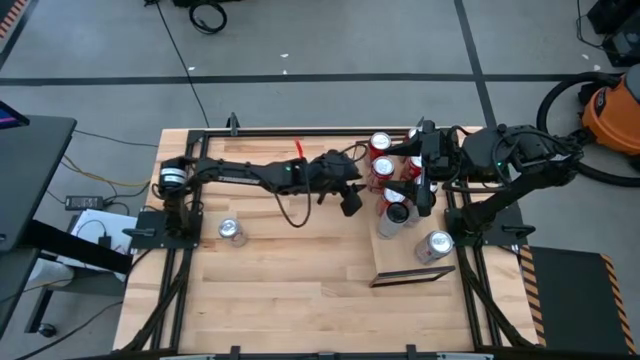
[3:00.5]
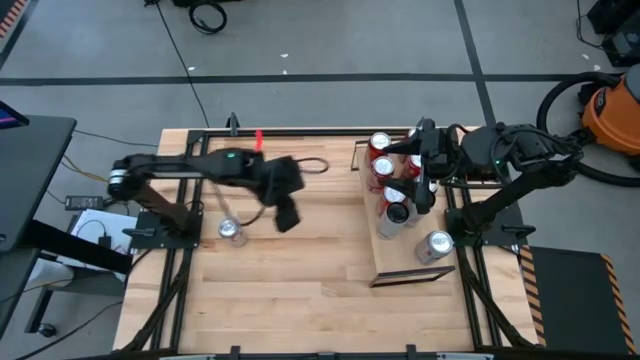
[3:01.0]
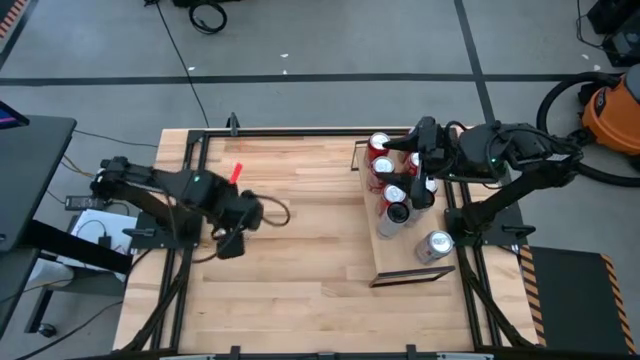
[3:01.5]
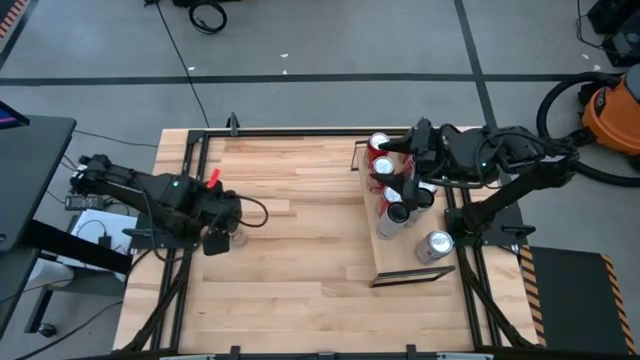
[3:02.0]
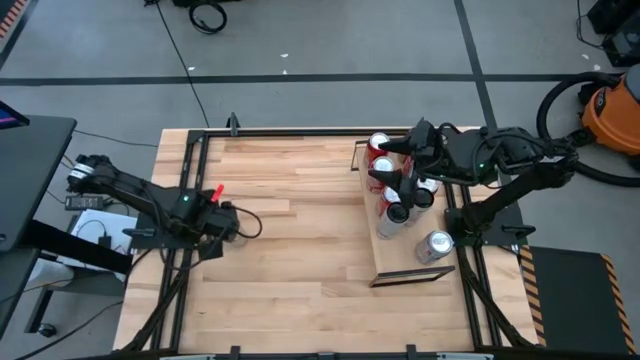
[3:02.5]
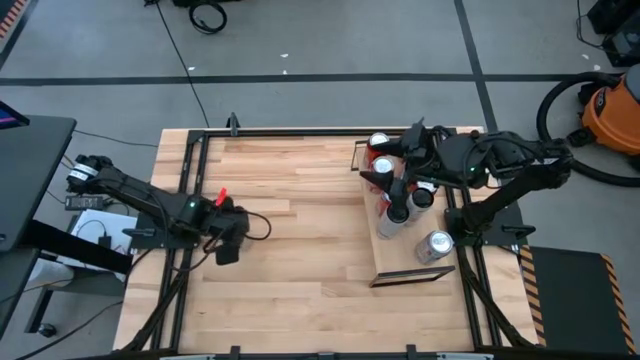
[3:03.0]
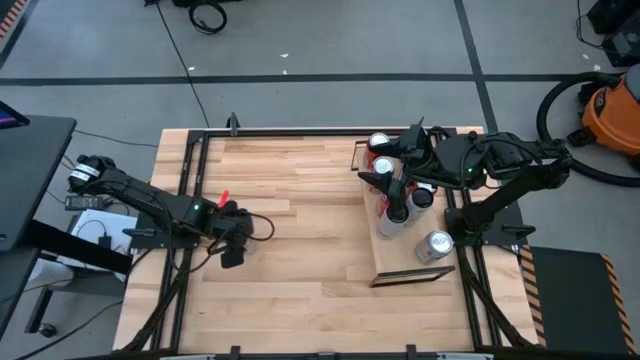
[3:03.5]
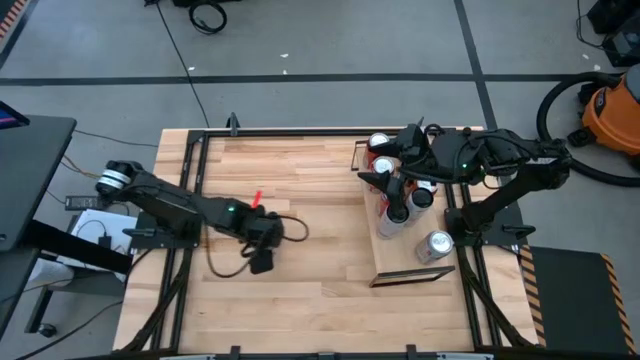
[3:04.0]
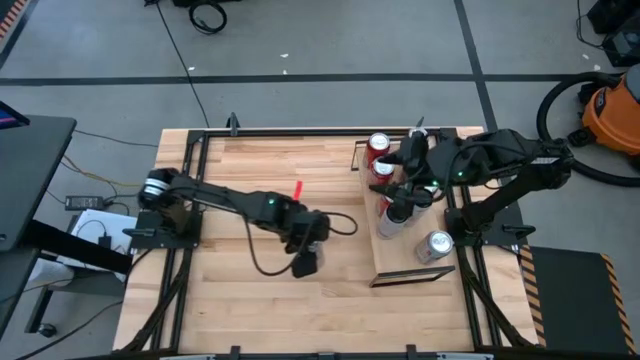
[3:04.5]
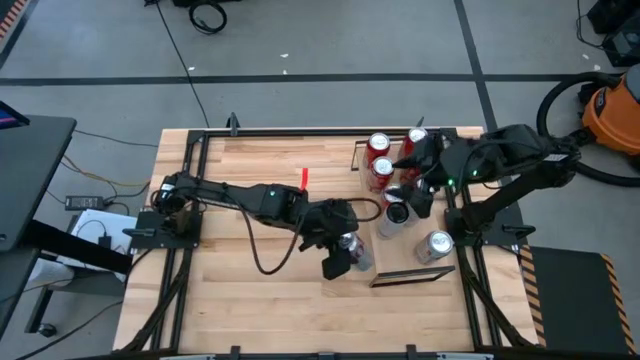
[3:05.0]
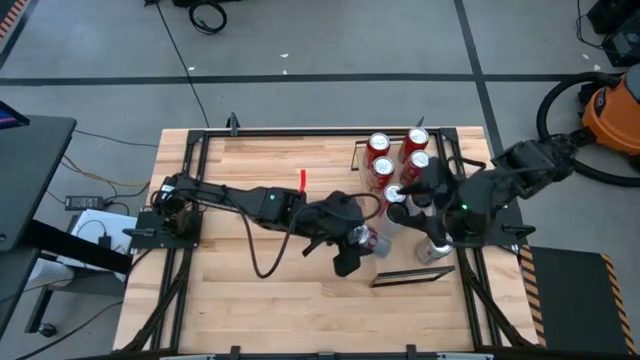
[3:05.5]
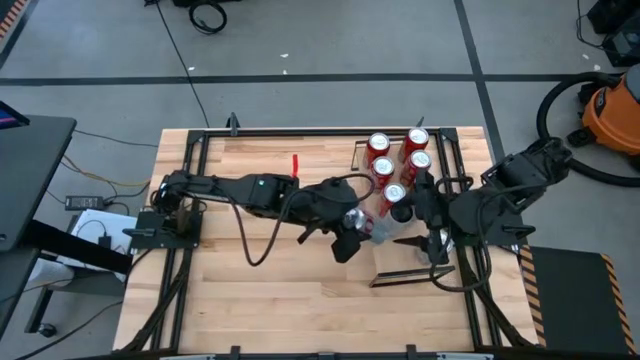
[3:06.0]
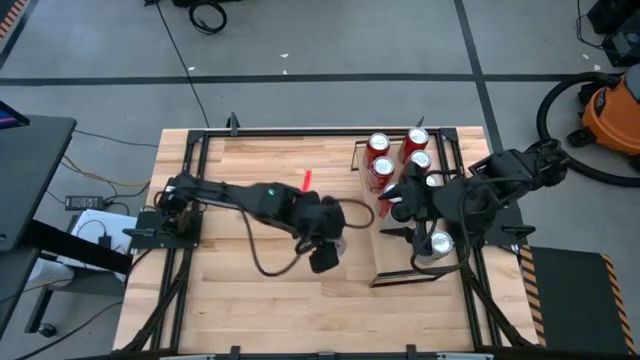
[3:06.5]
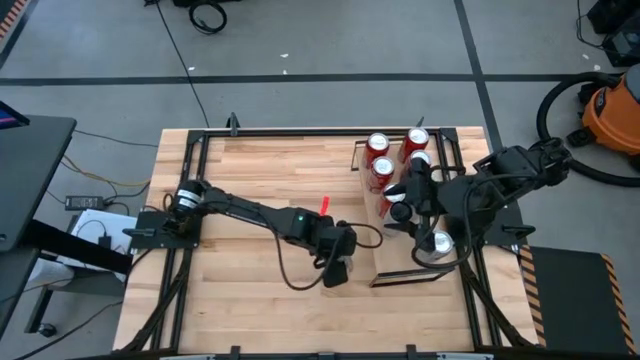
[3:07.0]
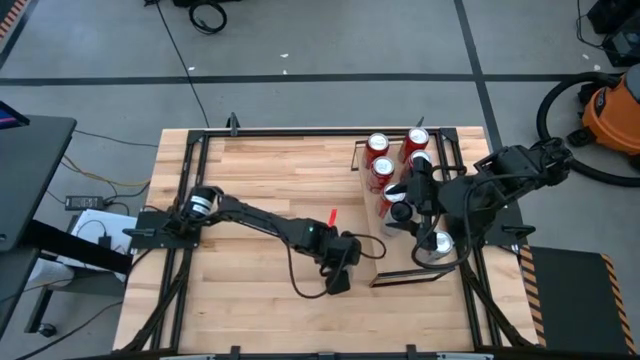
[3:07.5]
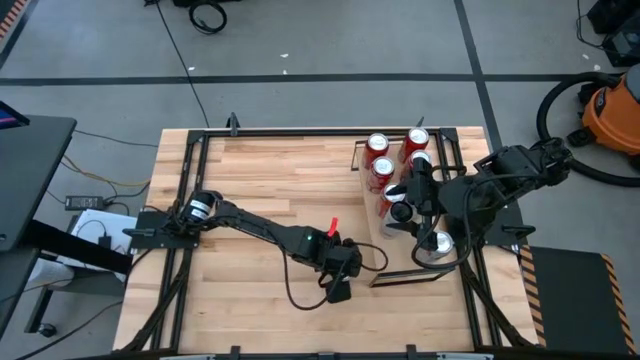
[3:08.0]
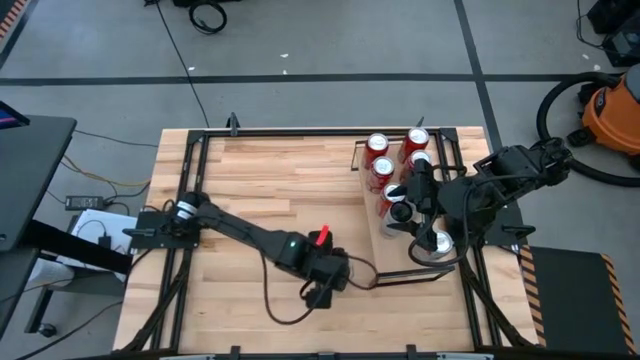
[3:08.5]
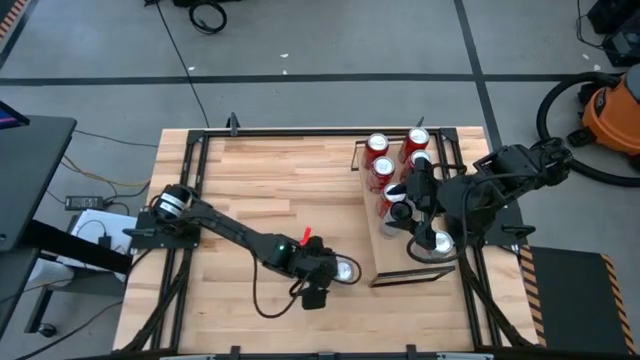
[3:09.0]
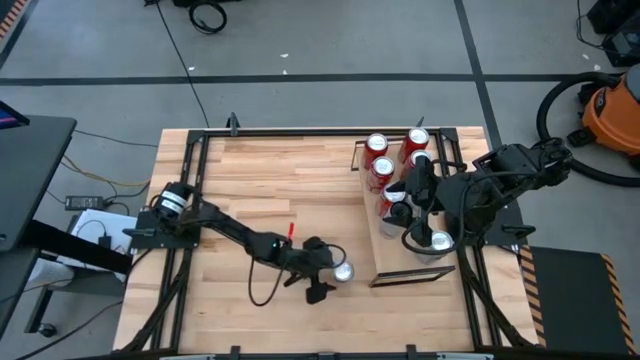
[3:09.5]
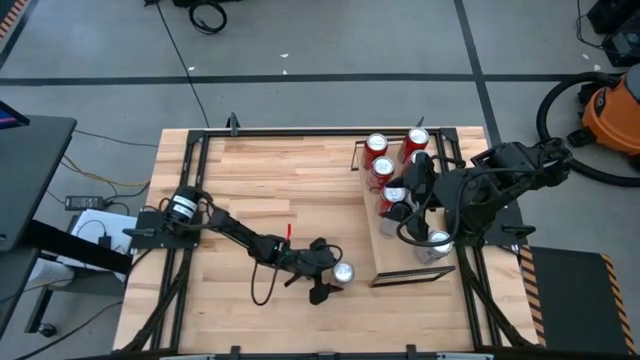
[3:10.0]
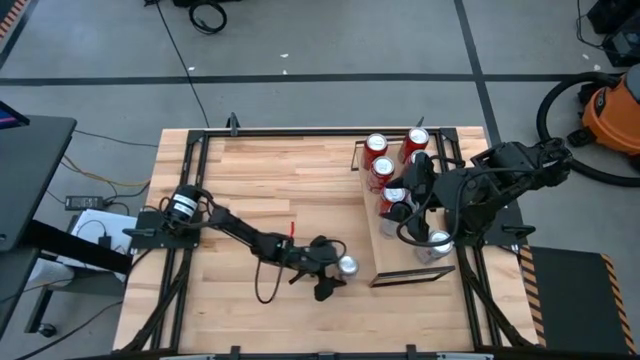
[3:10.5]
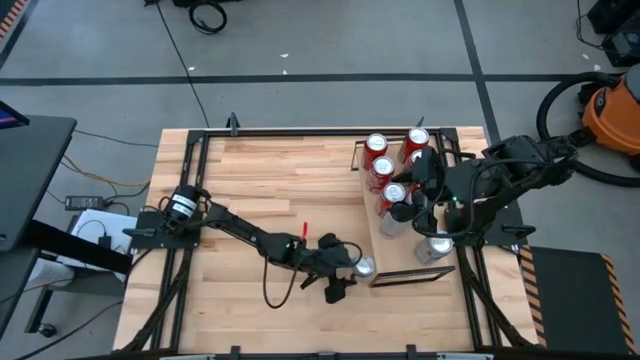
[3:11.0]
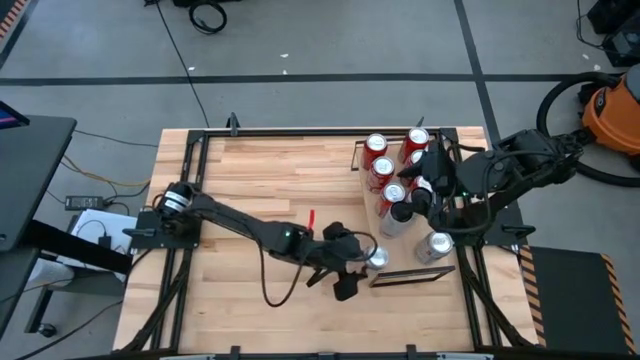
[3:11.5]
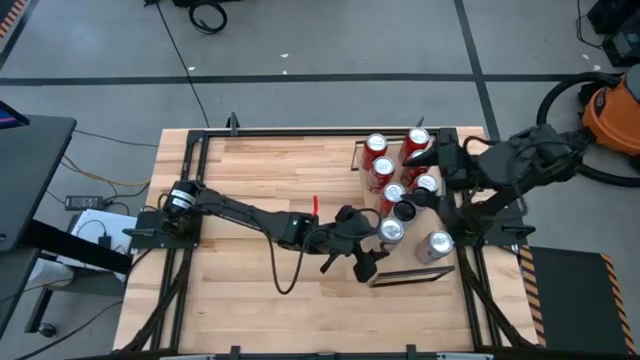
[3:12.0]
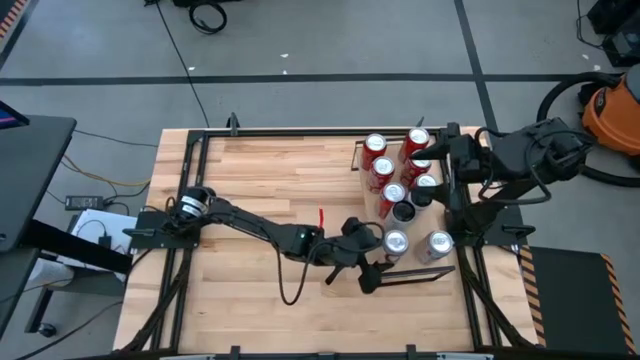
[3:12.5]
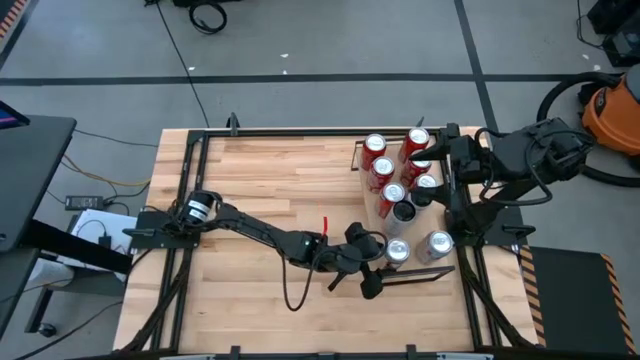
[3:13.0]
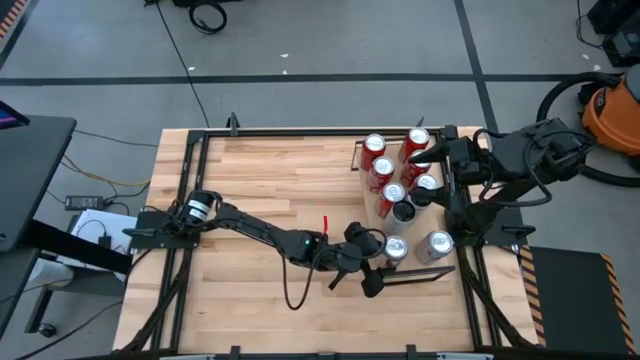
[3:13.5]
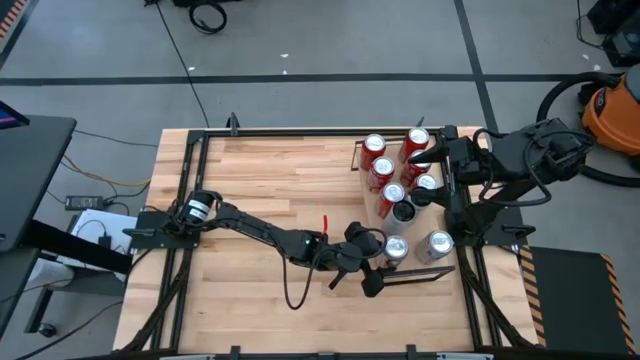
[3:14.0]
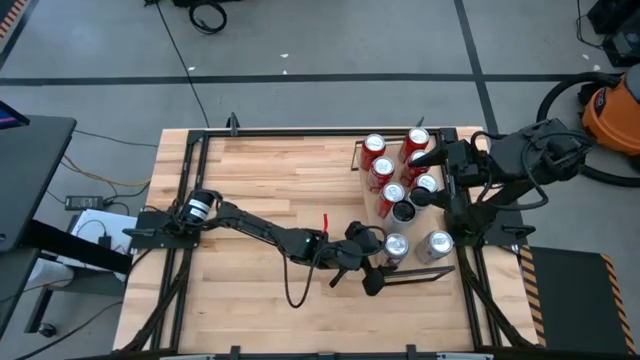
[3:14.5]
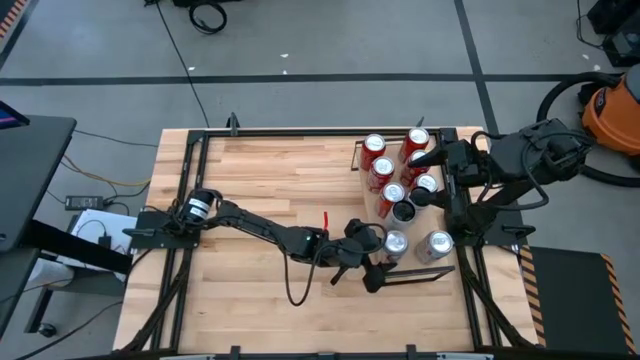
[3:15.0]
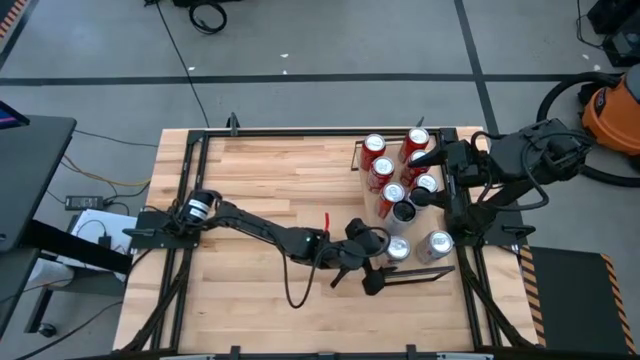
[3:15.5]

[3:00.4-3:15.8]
Task: Place canned beverage on shelf
Put the red silver soda can on the shelf aligned with the other red silver soda can

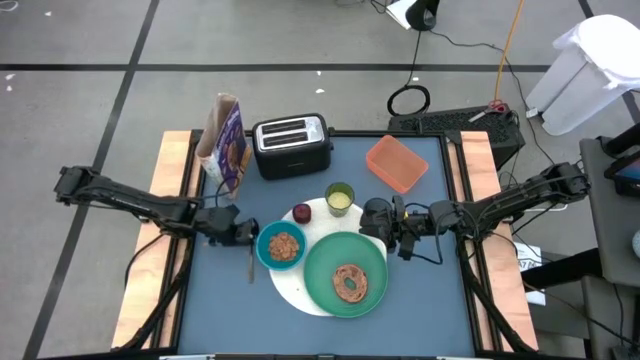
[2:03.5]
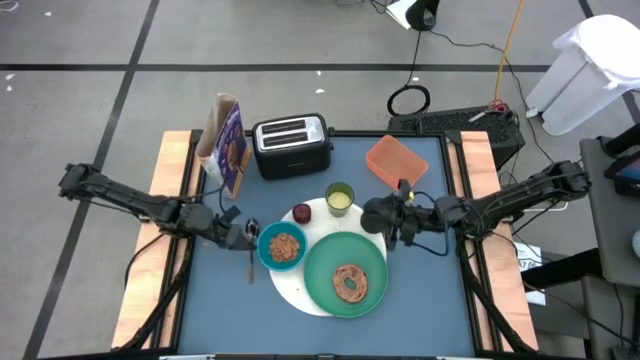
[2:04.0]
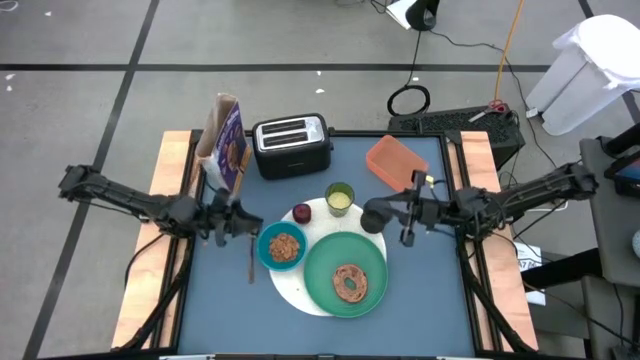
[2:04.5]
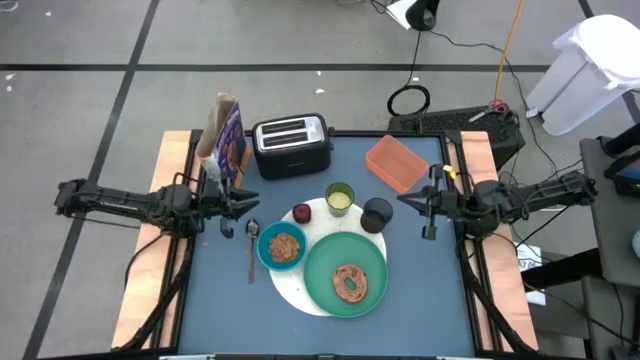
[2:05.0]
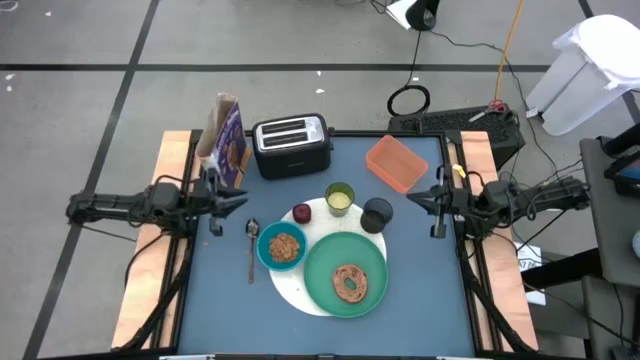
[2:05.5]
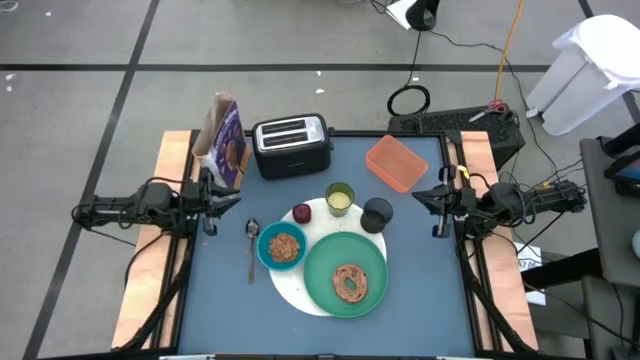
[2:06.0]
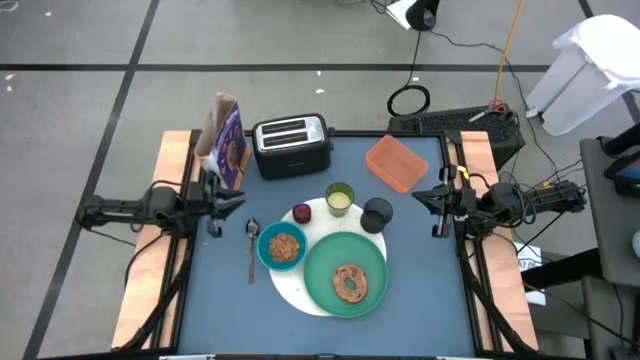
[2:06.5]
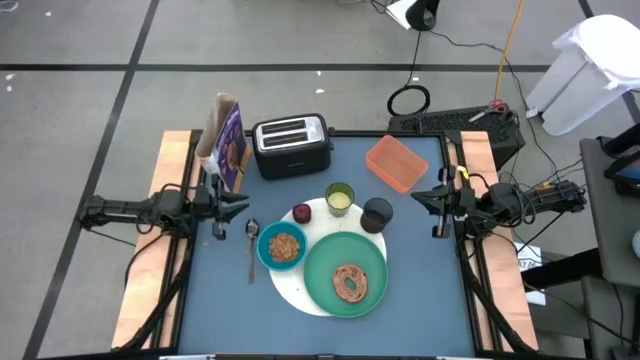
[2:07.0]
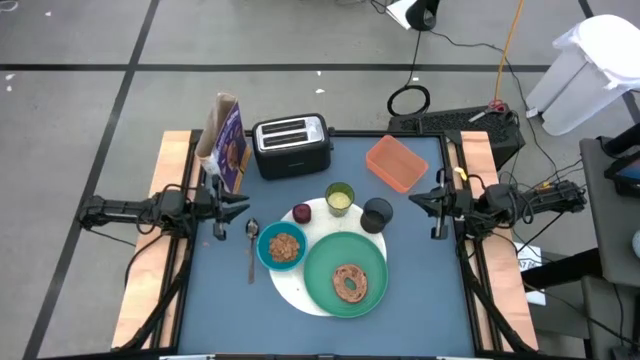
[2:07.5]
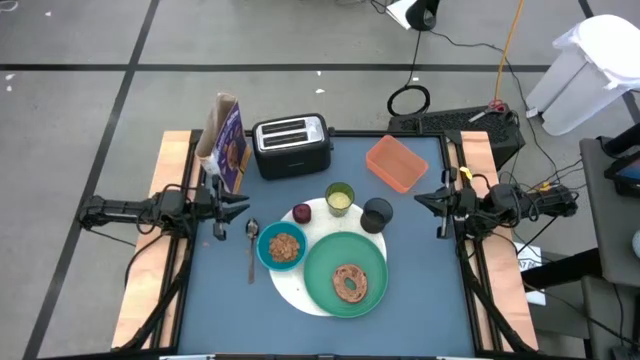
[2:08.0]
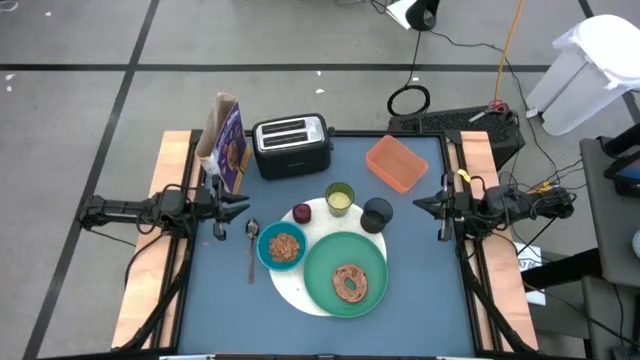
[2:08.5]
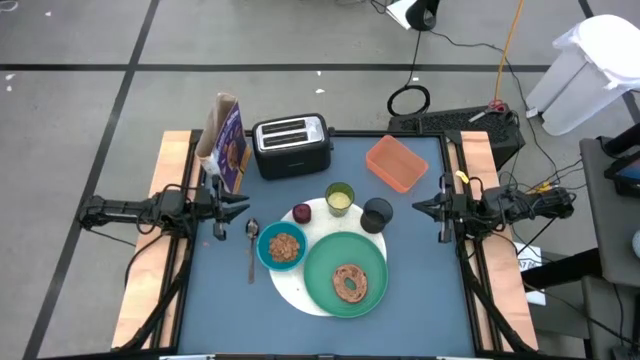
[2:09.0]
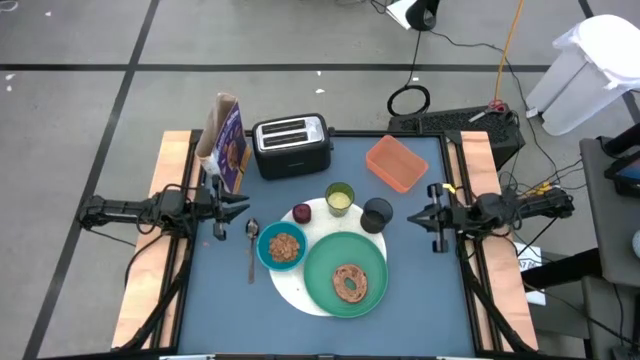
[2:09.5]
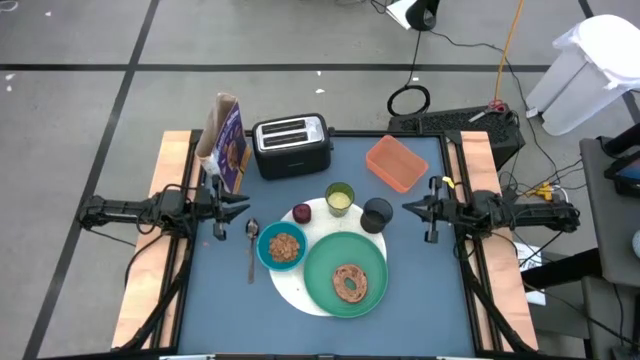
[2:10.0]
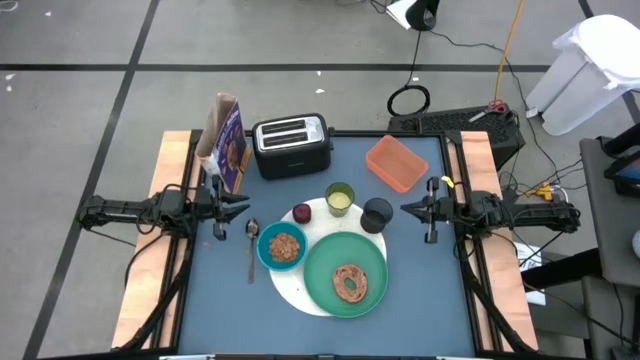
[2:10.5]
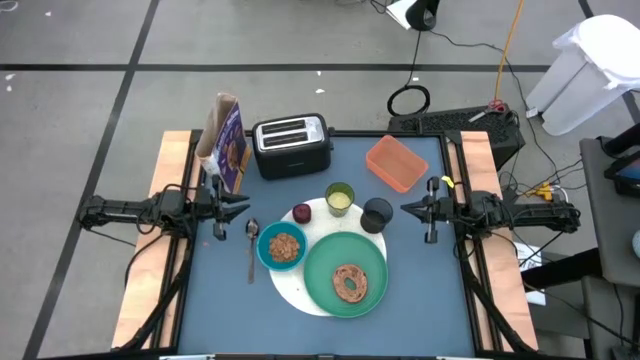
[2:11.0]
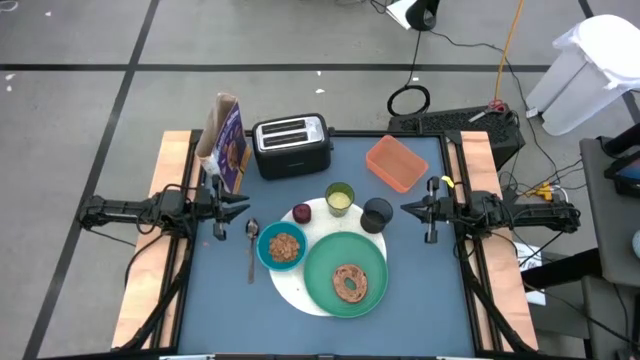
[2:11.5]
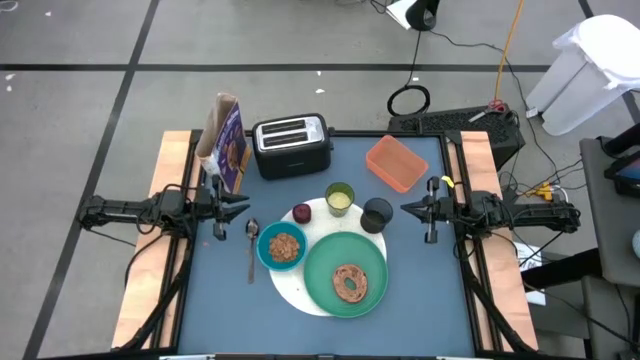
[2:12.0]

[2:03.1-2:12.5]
Task: Arrange a breakfast setting
Return to Home Position
